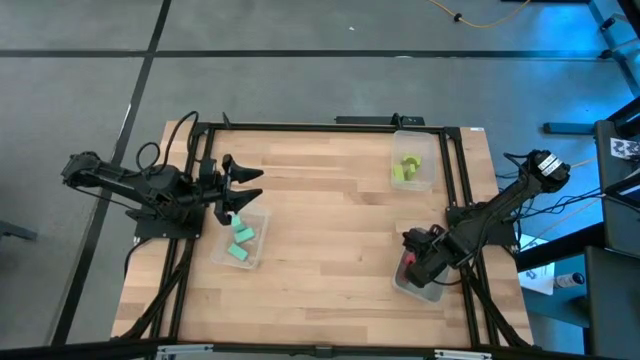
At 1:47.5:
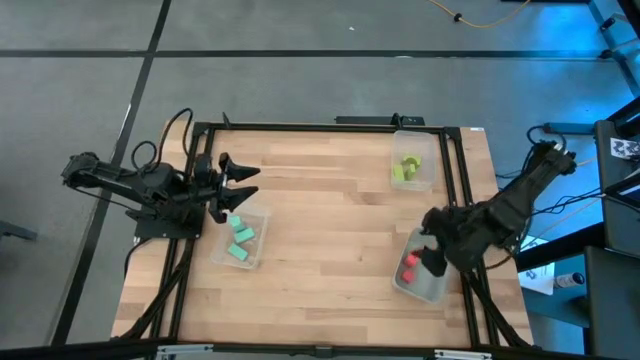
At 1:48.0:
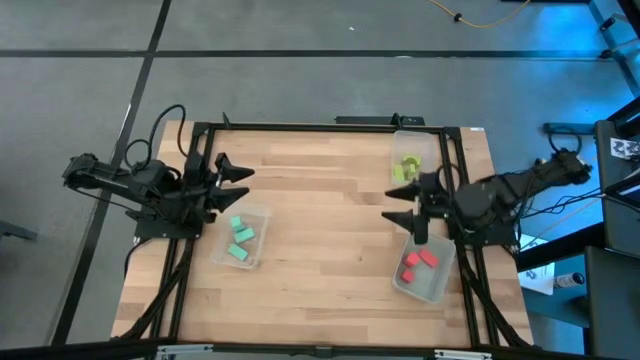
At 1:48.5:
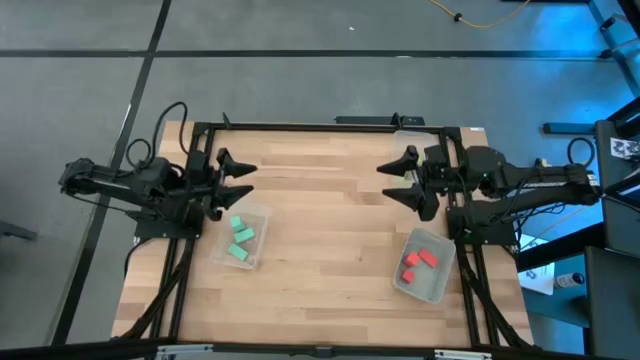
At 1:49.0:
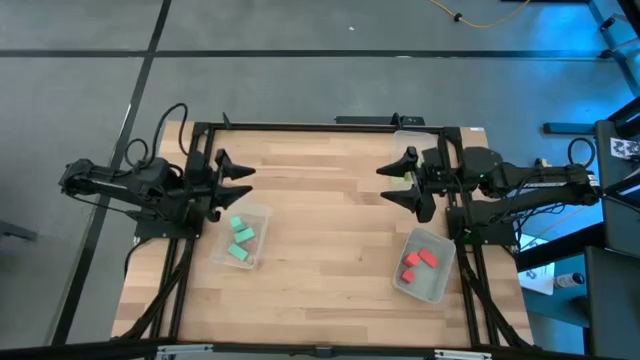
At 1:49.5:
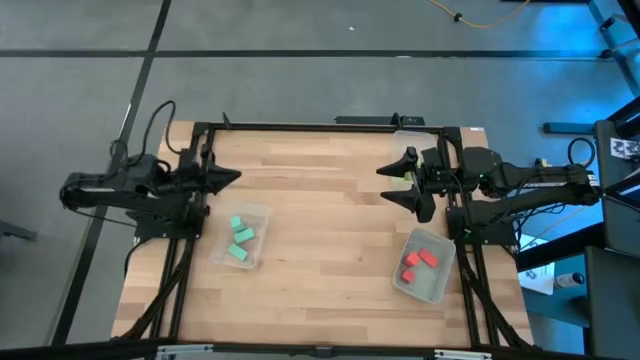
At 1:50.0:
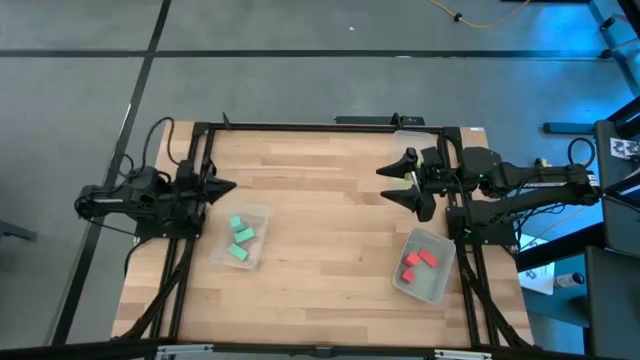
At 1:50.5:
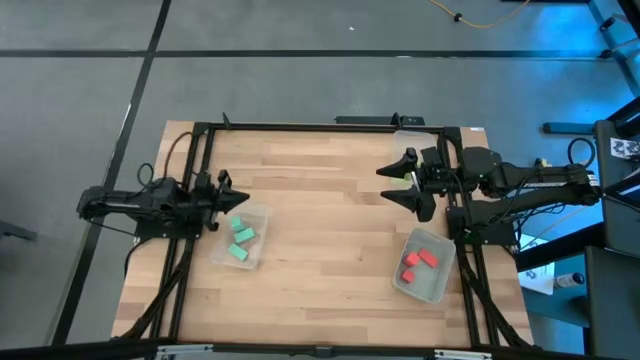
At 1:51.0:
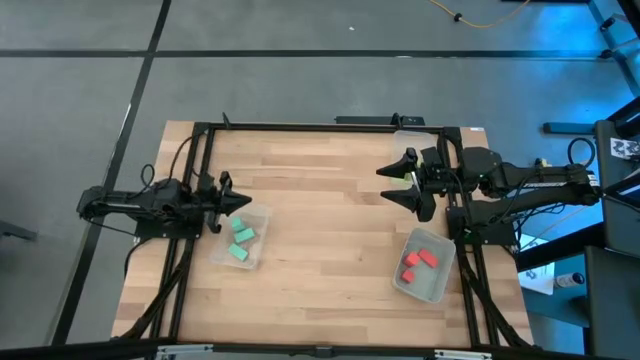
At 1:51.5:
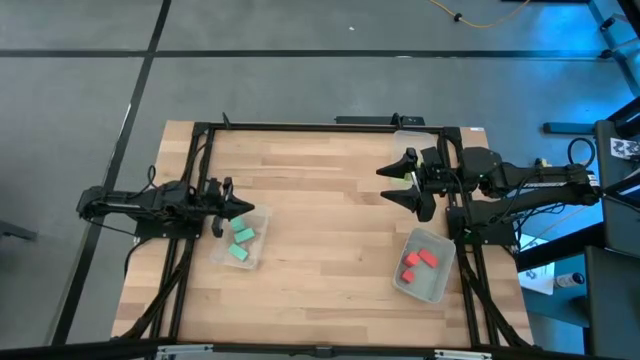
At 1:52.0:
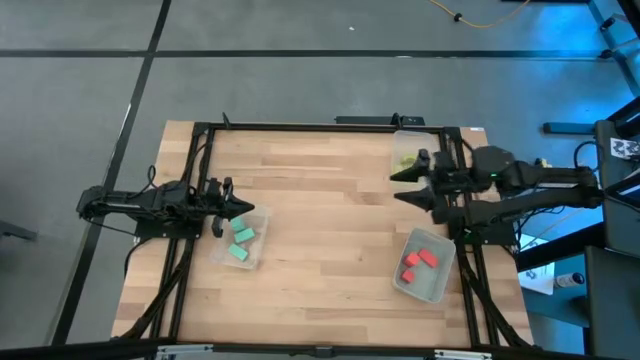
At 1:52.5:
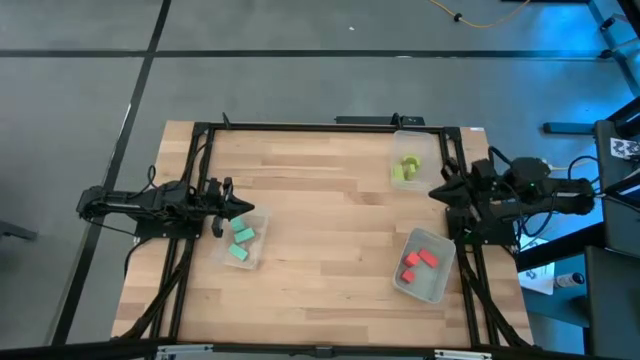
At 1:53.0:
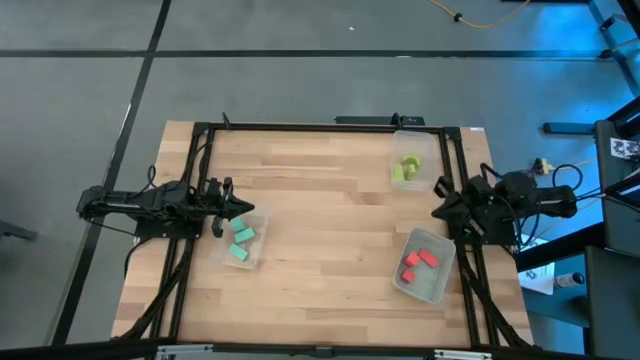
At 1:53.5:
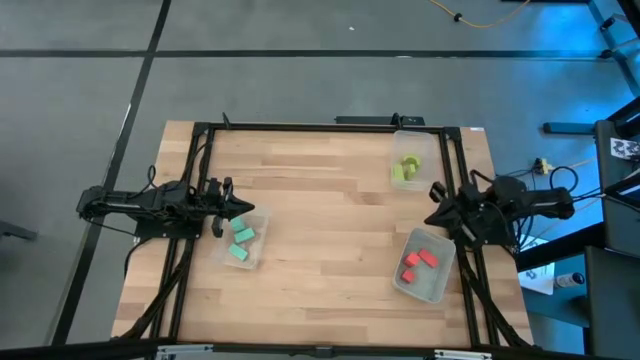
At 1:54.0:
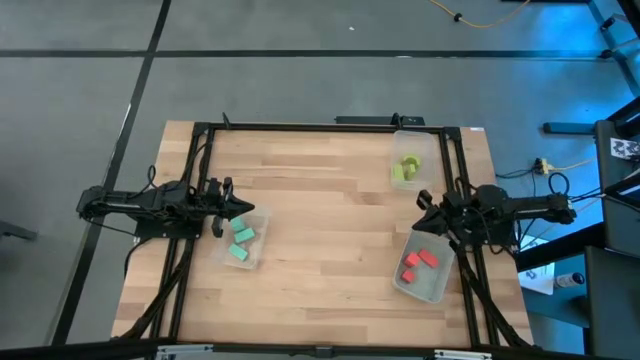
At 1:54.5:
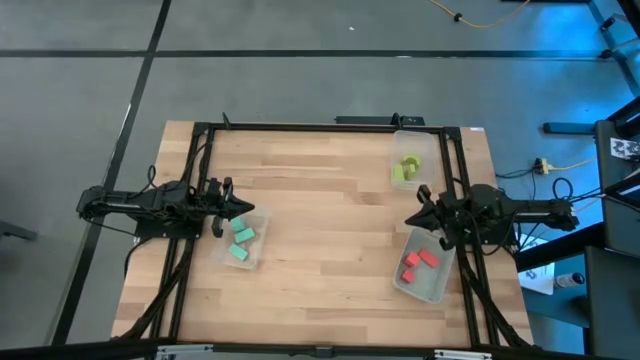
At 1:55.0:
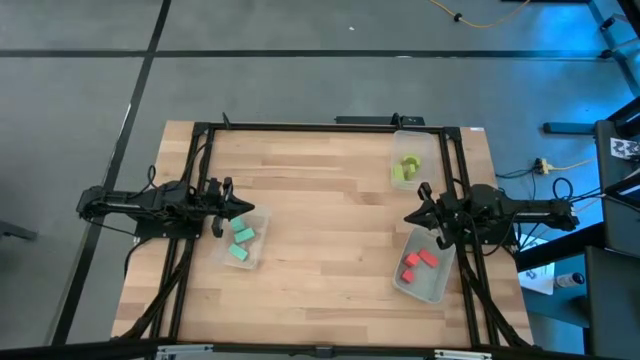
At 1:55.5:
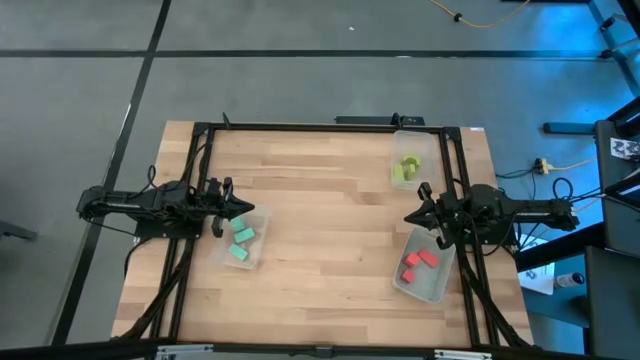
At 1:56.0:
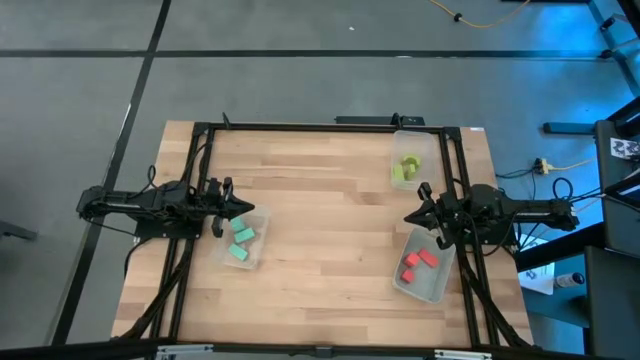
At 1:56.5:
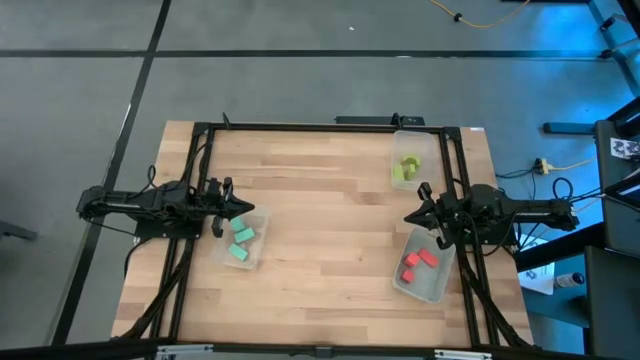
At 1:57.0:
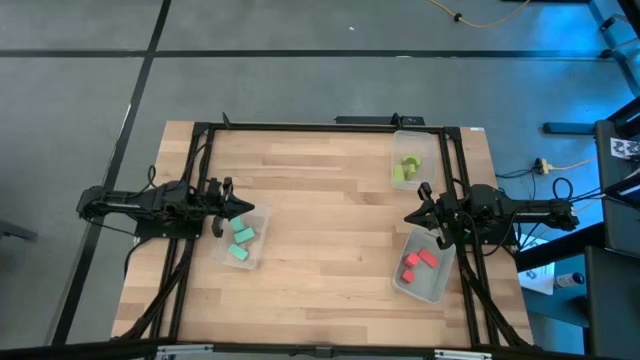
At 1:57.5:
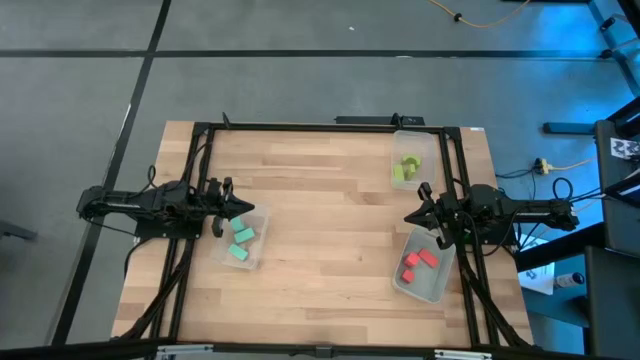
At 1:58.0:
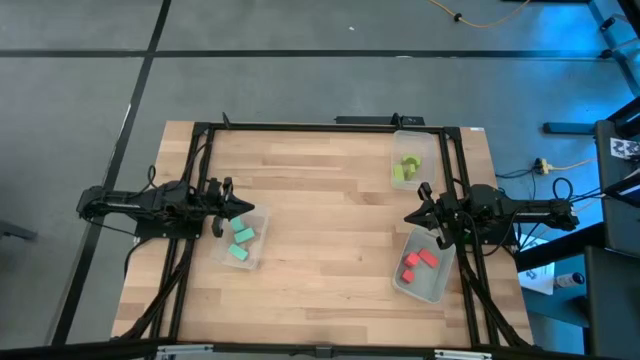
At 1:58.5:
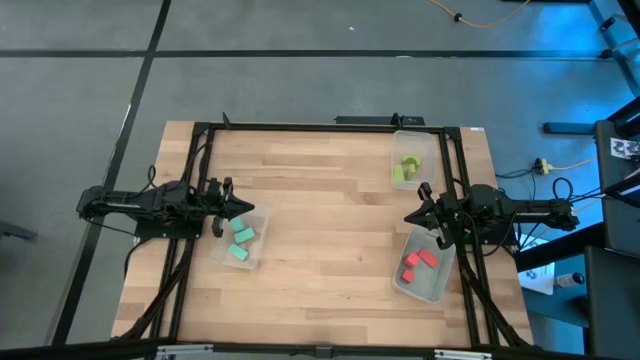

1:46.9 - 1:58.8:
Task: Sort & place blocks by color
Return to Home Position

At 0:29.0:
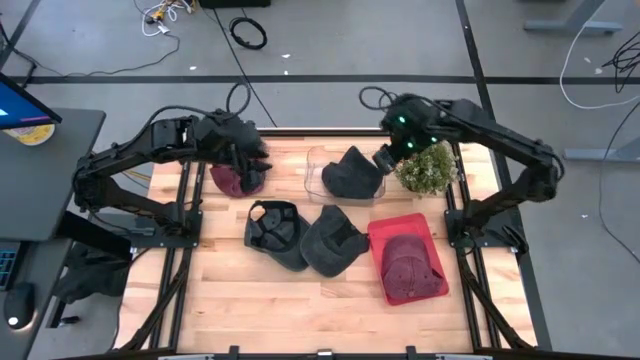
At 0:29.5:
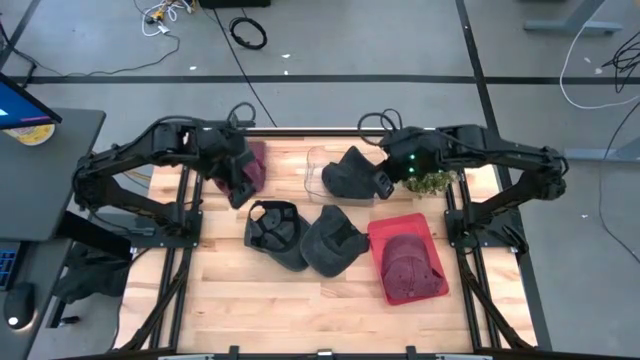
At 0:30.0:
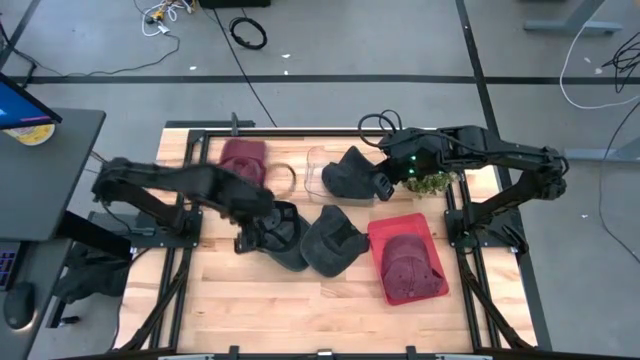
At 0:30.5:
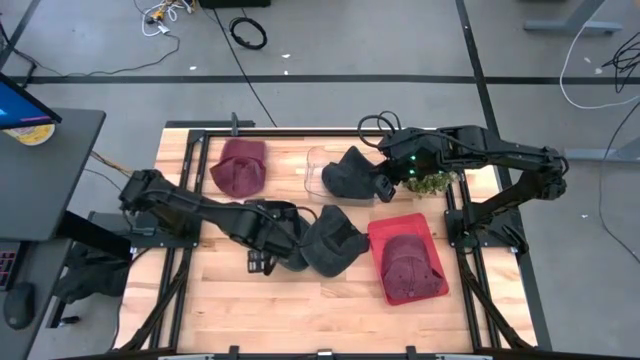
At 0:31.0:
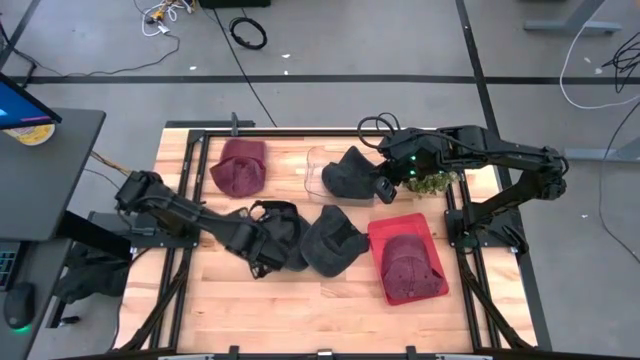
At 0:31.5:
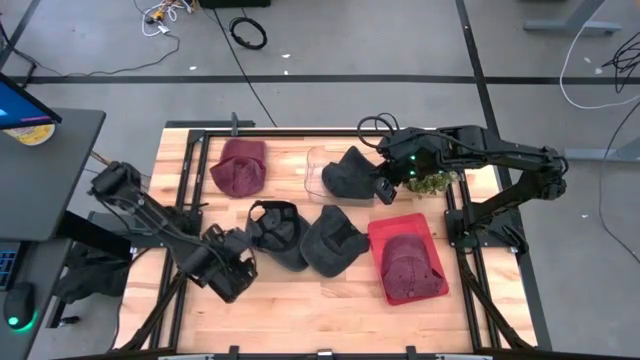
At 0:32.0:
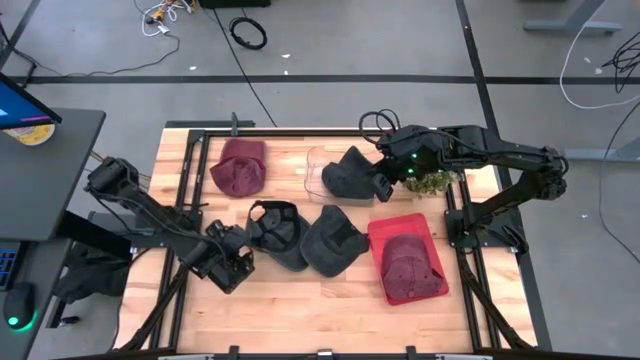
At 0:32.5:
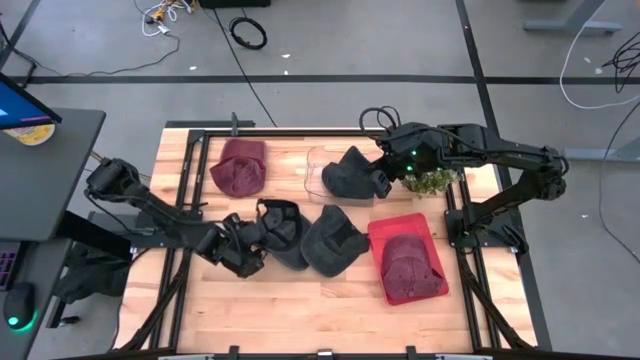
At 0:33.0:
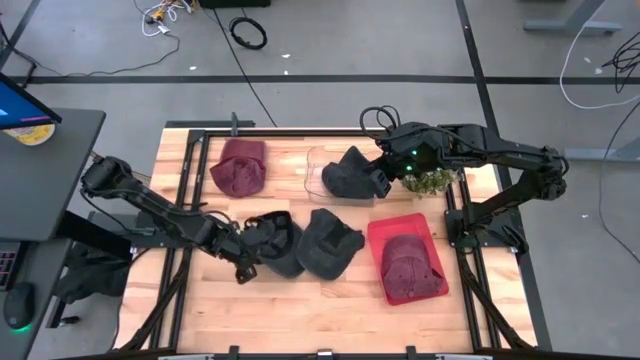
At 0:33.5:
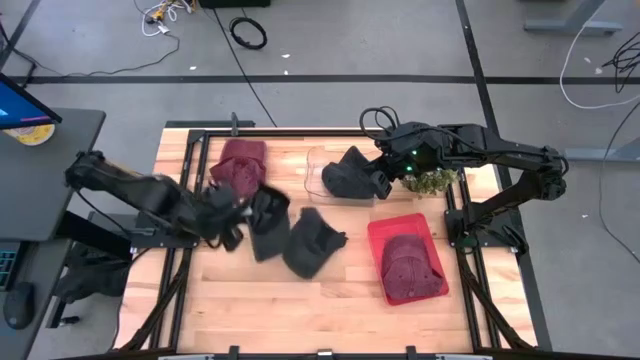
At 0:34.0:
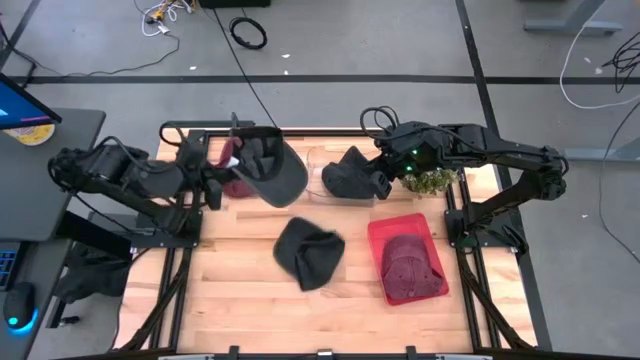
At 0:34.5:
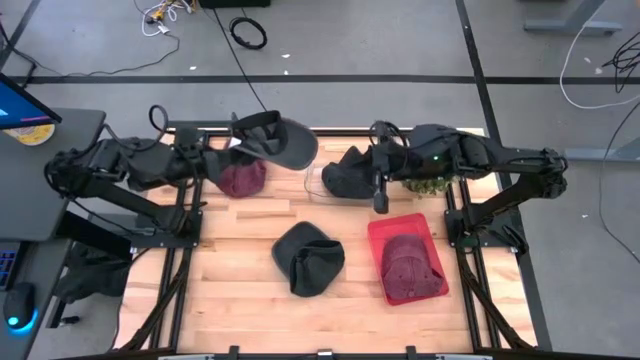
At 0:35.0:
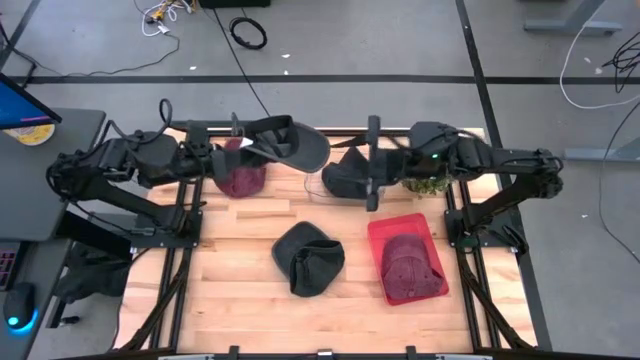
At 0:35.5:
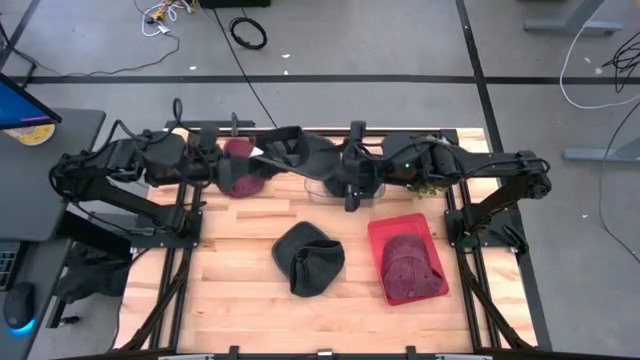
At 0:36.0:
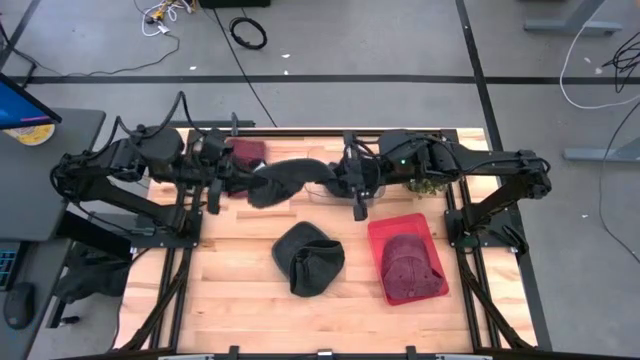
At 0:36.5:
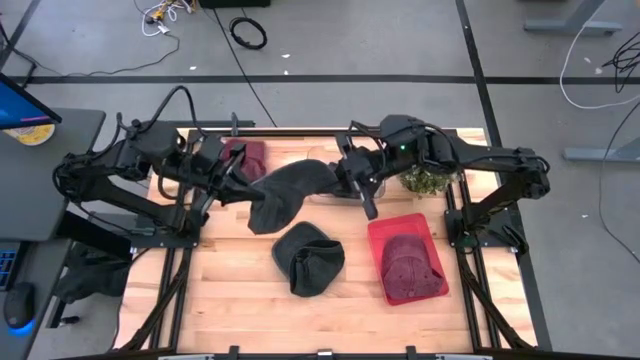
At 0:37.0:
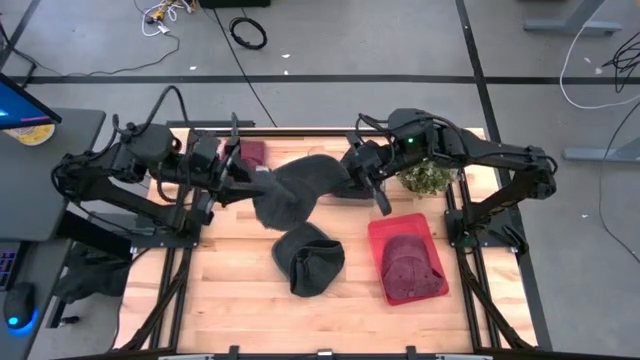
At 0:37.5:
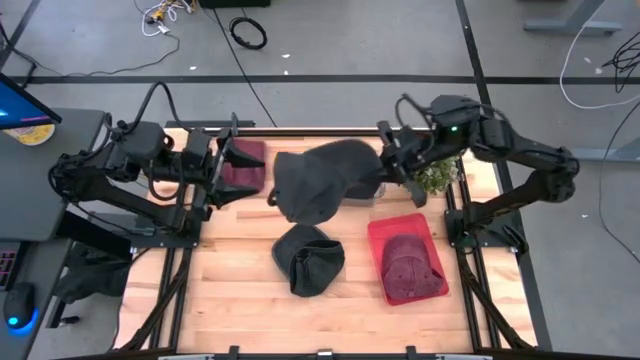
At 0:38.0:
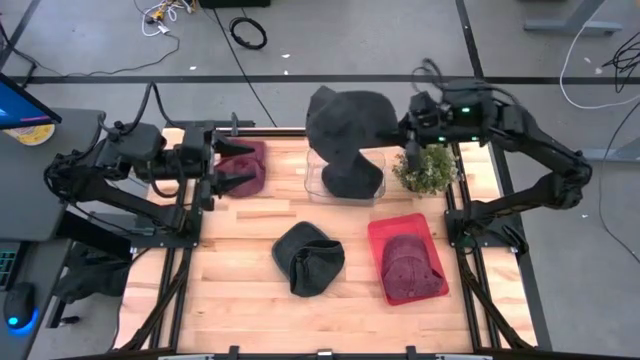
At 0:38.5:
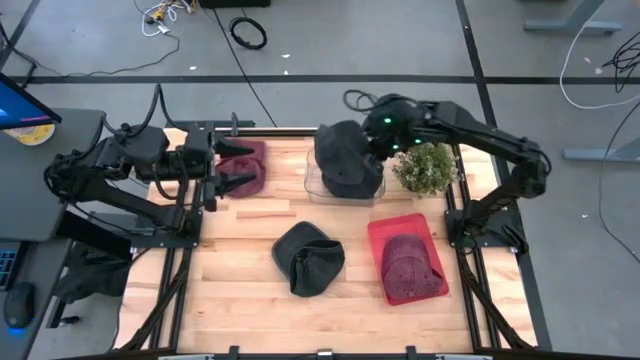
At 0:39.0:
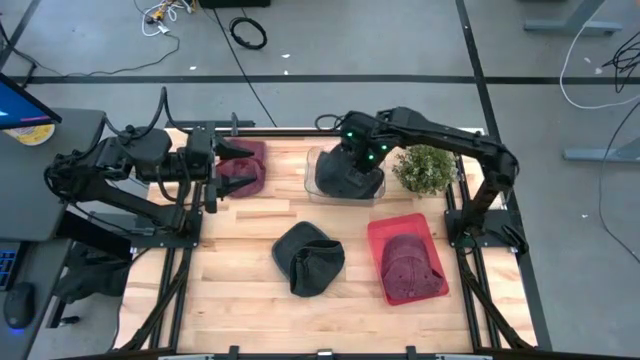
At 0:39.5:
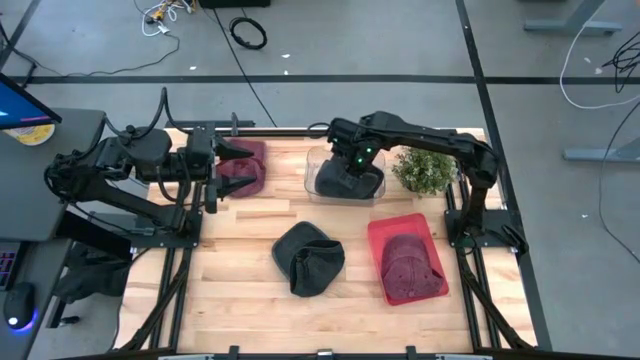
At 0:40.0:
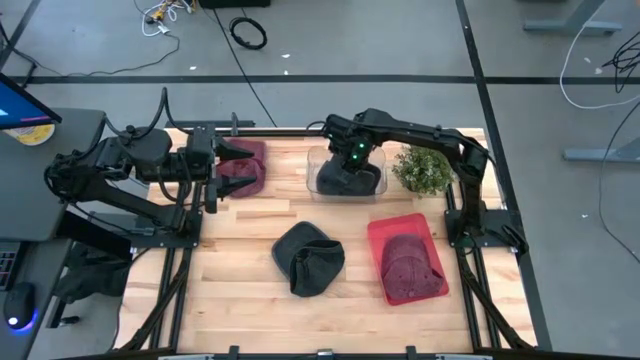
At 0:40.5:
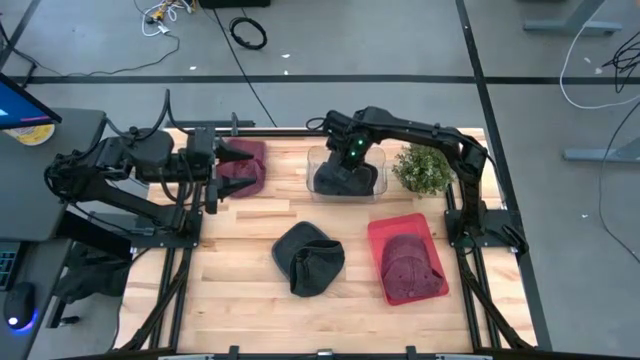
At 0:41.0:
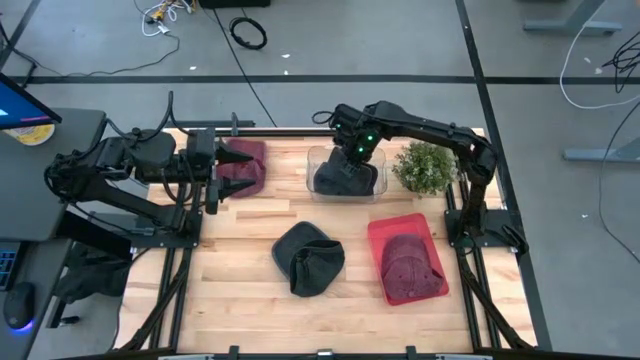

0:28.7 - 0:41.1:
Task: Pick & Place hat
Put the left black cap into the transparent bin
